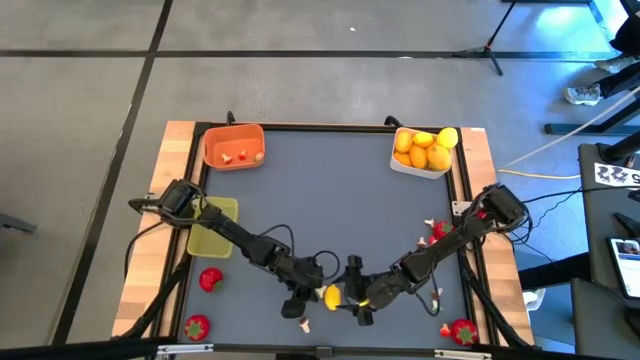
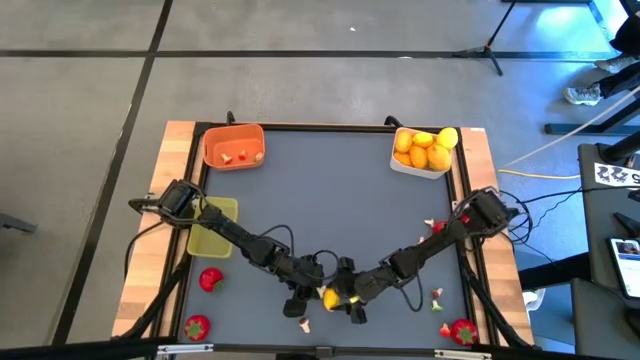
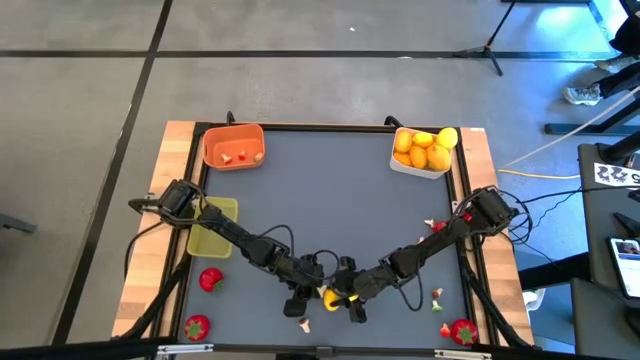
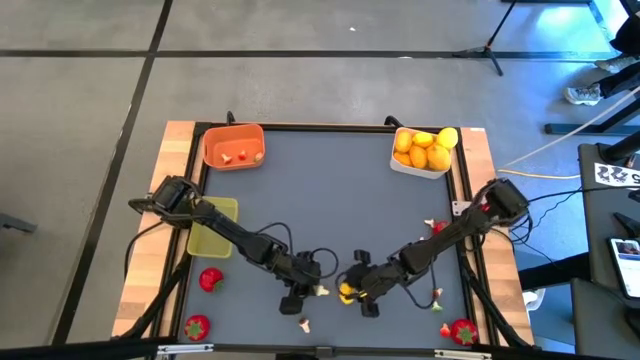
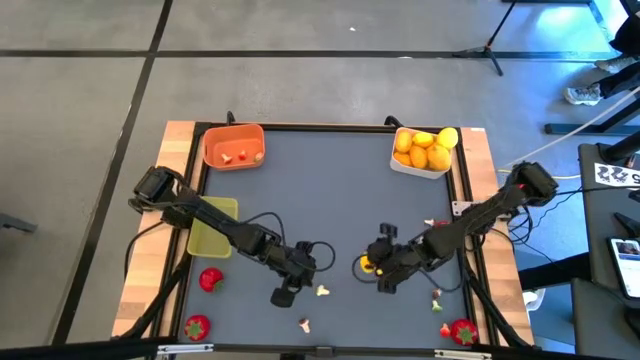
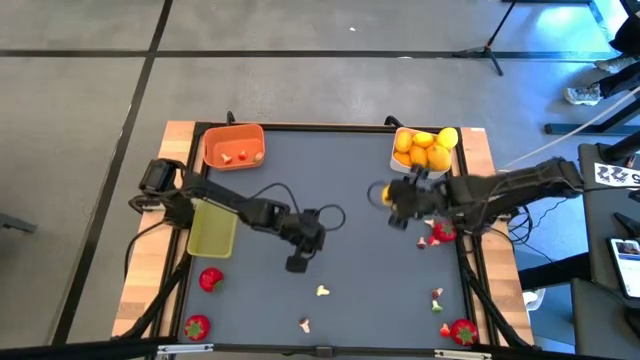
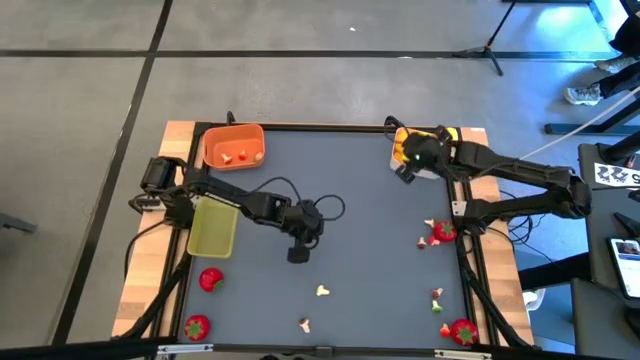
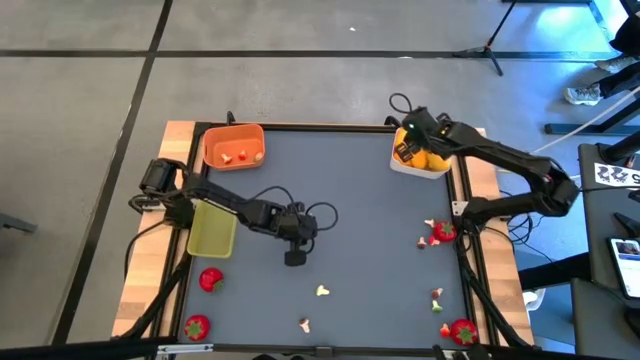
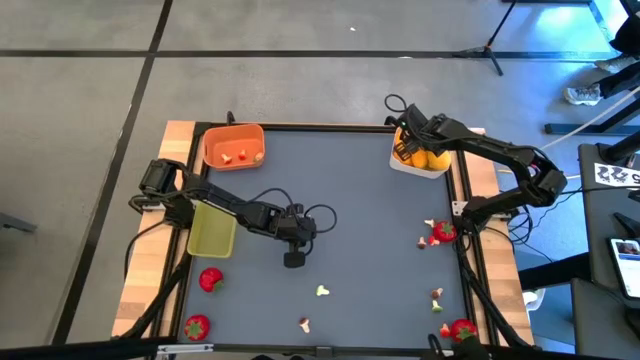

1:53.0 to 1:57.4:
Task: Sort produce into baskets
Put the lemon into the white bin

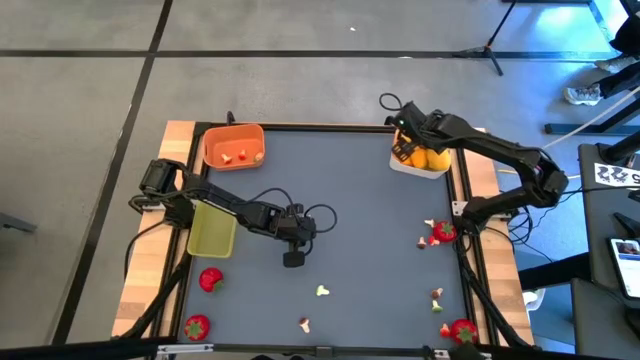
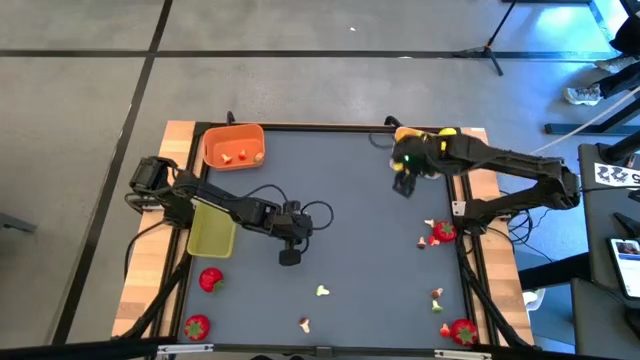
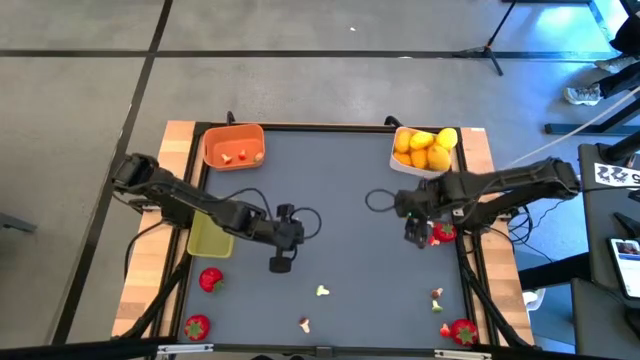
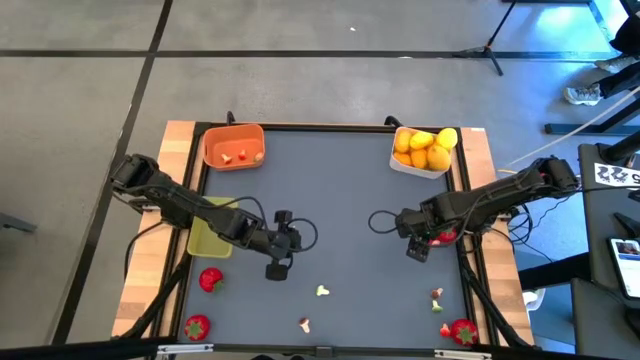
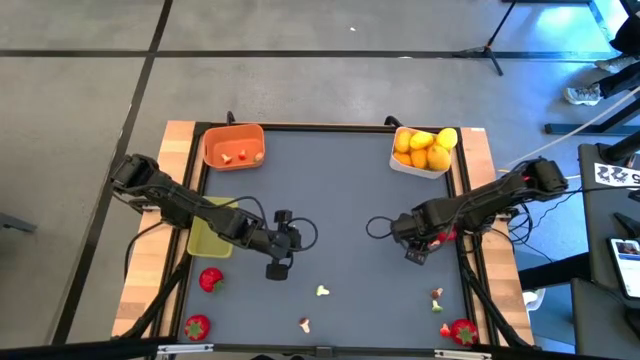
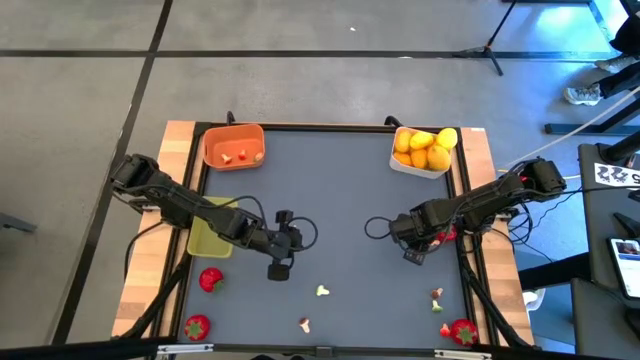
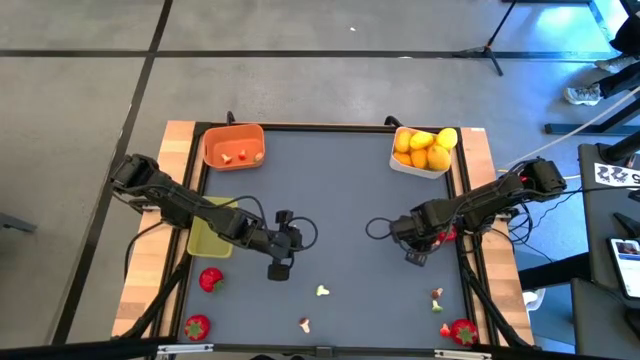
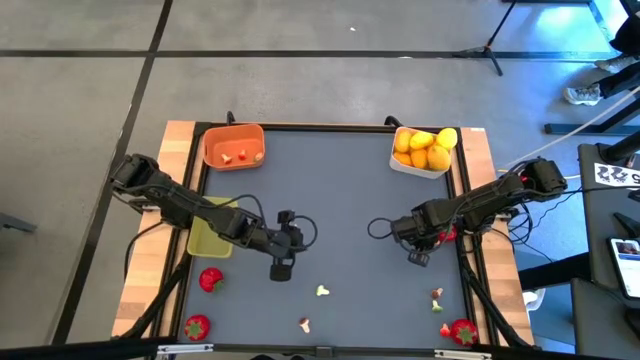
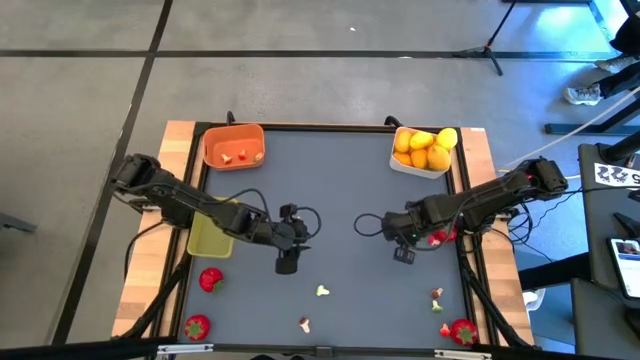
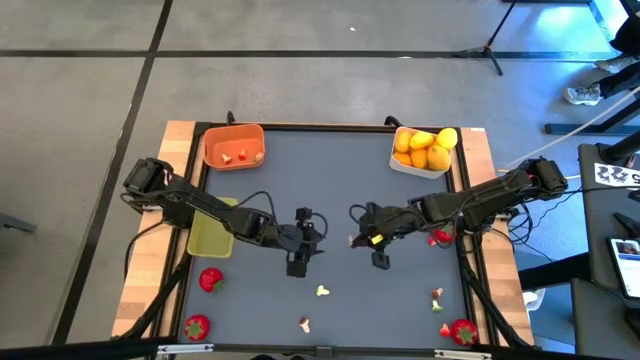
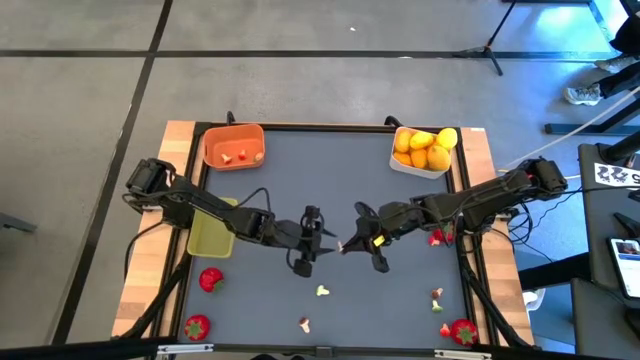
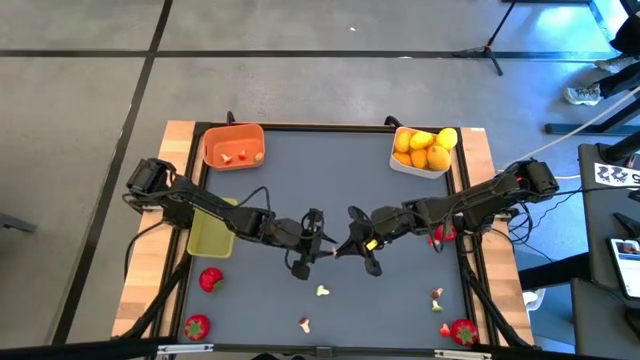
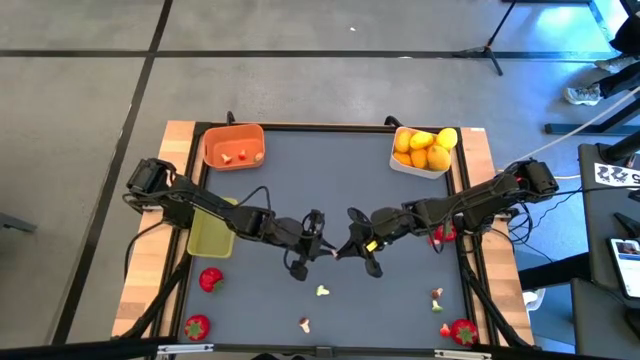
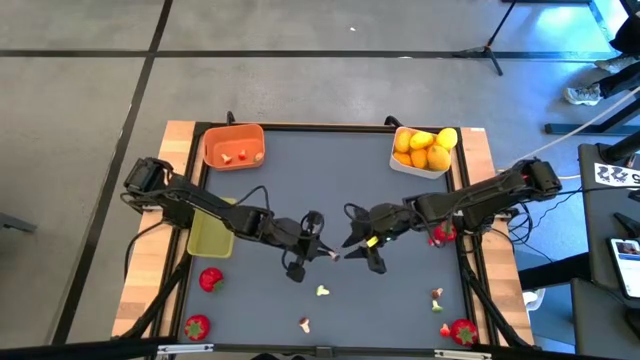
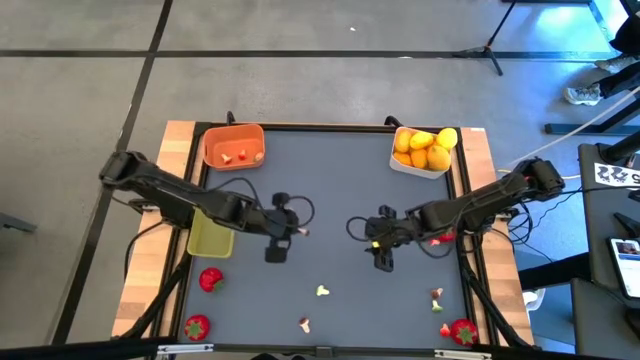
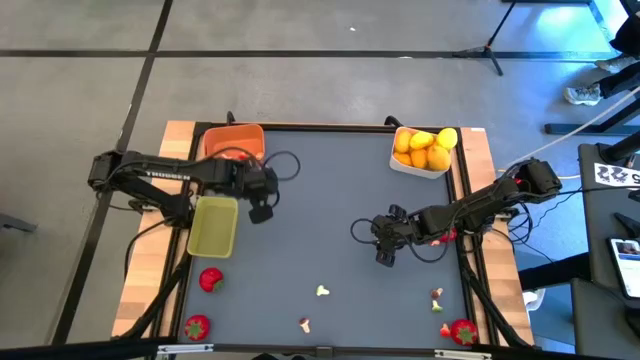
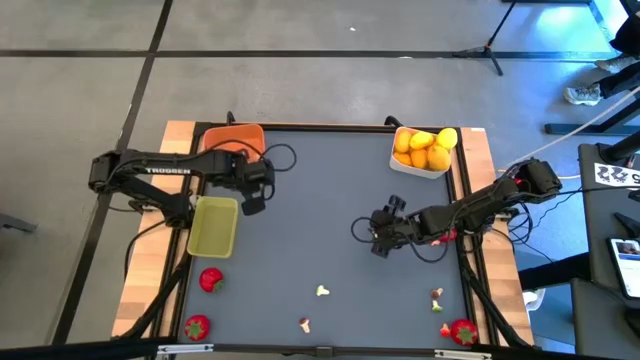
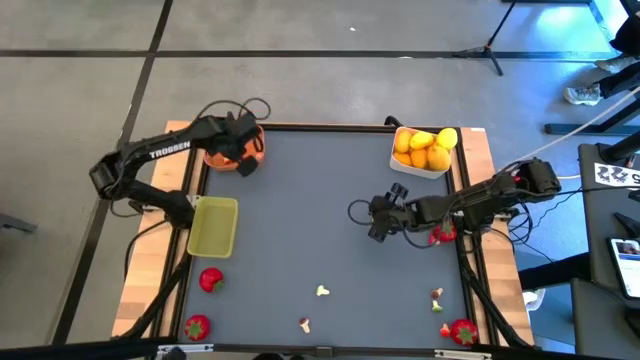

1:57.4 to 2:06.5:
Put the brown mushroom into the orange bin

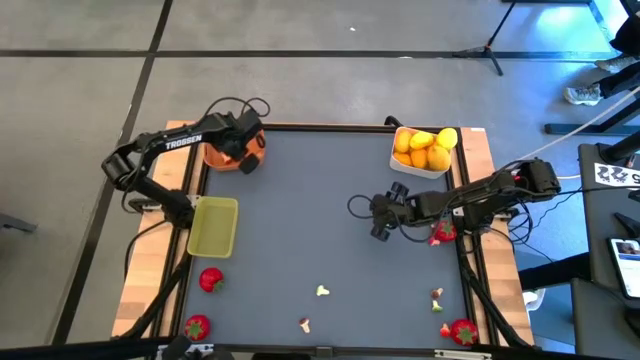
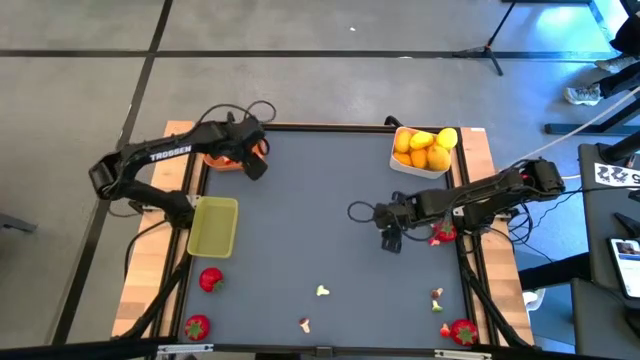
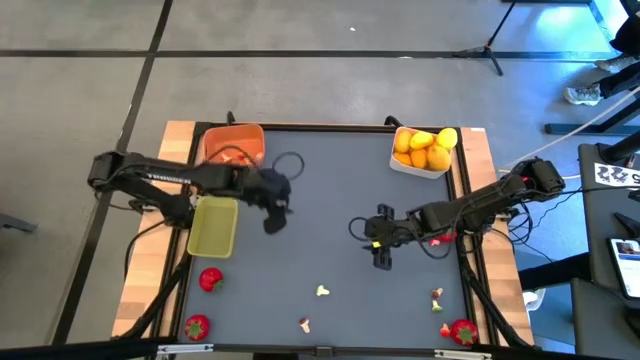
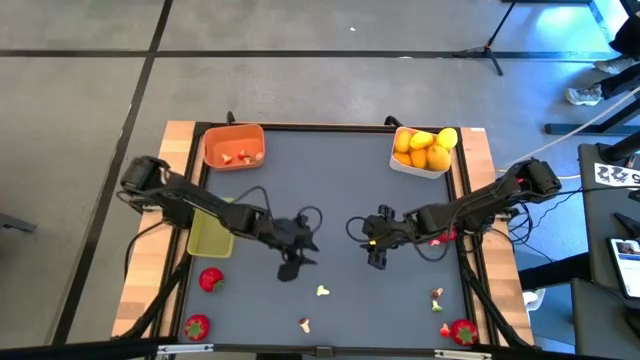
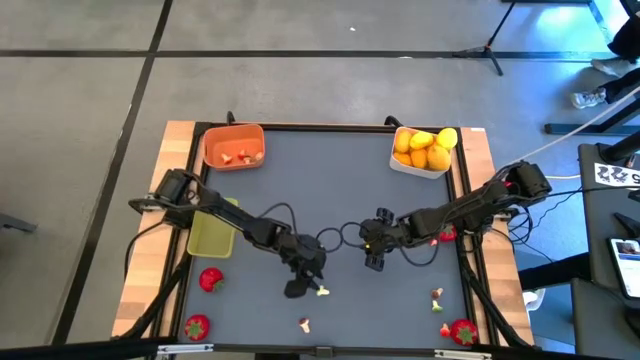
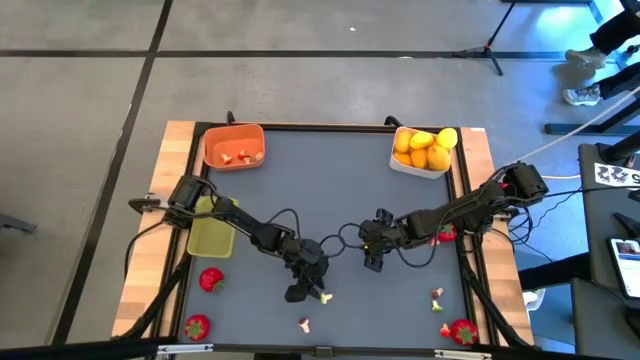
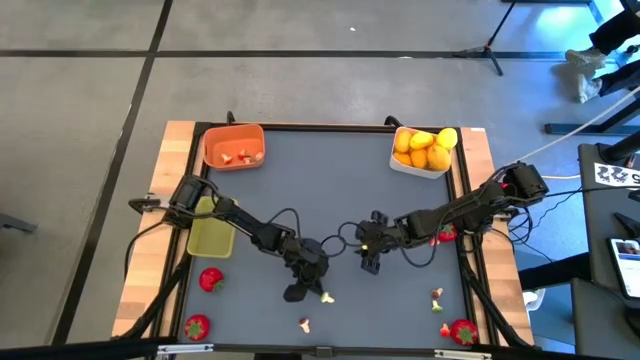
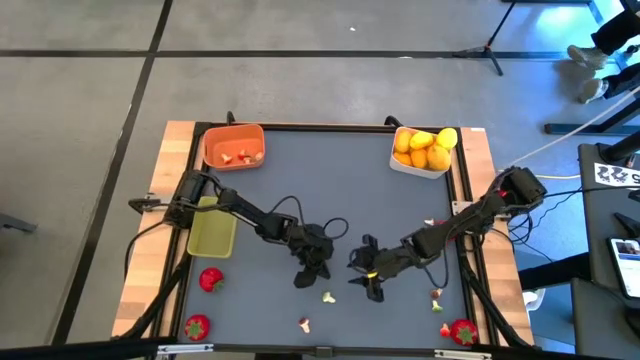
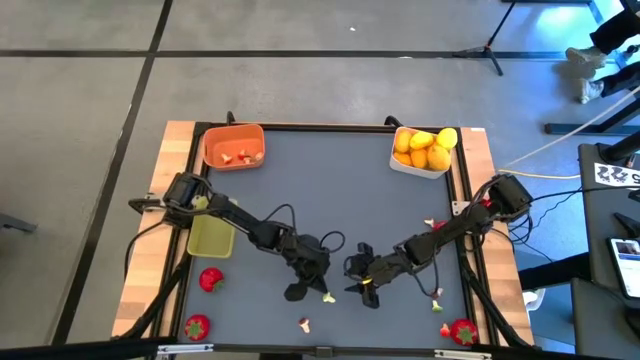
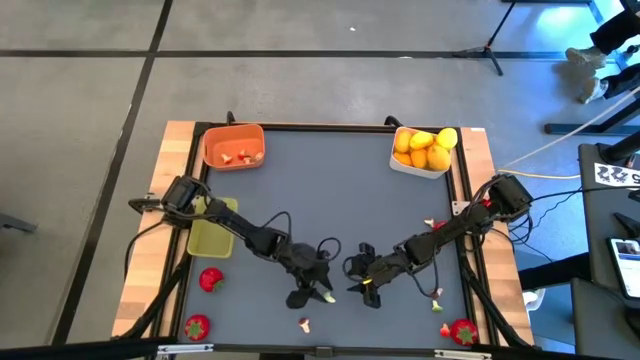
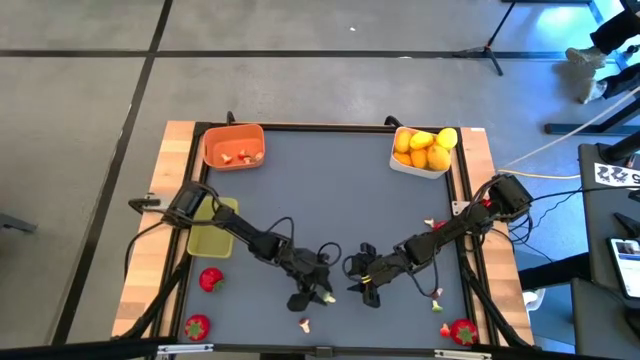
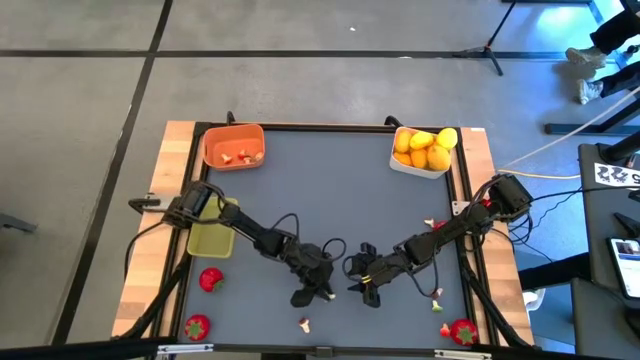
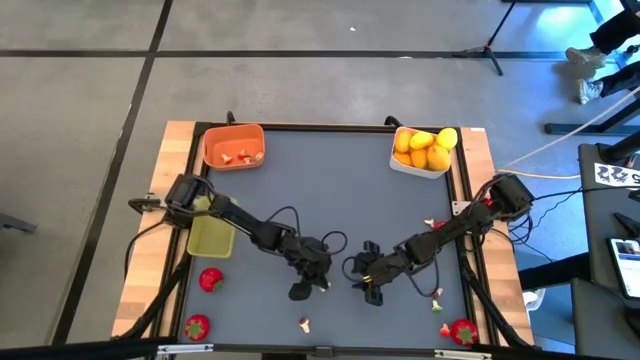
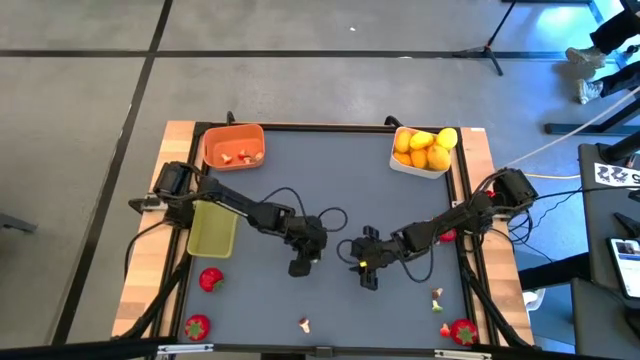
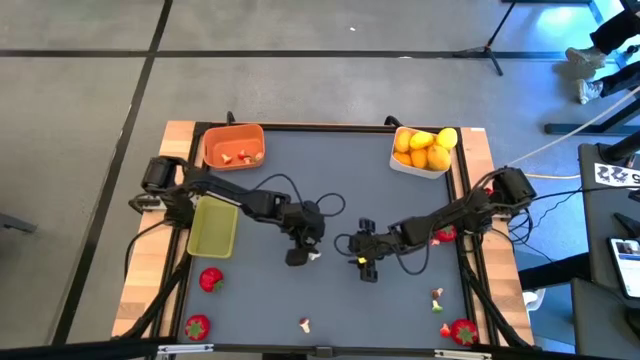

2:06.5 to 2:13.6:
Put the green mushroom into the orange bin

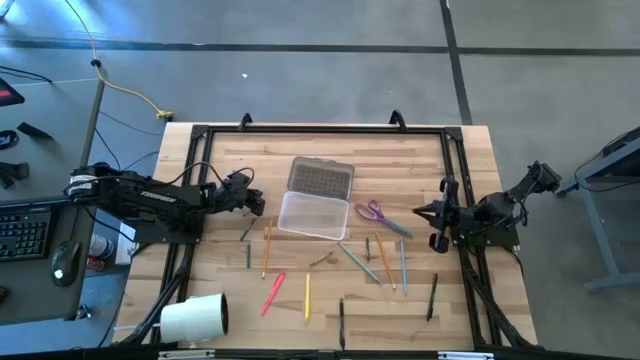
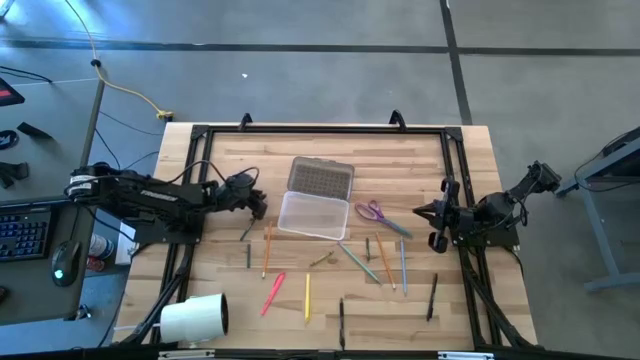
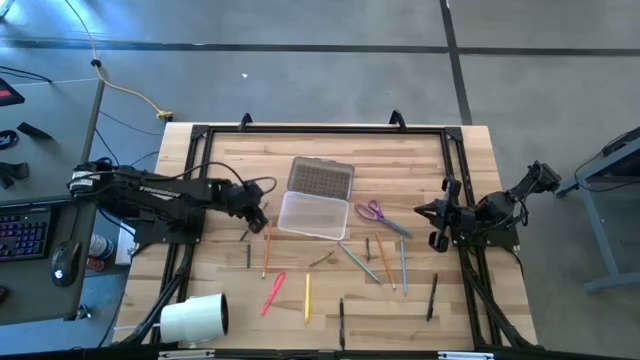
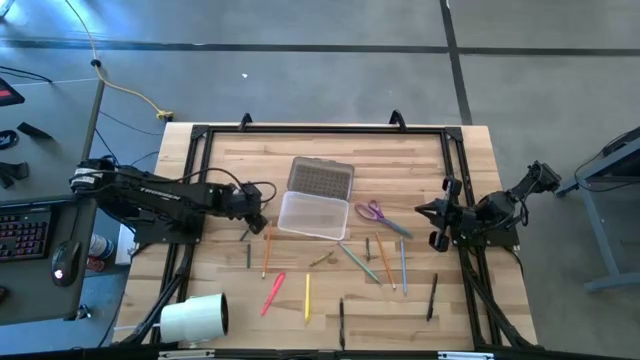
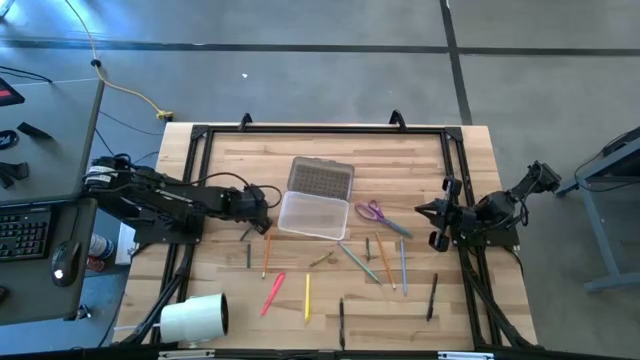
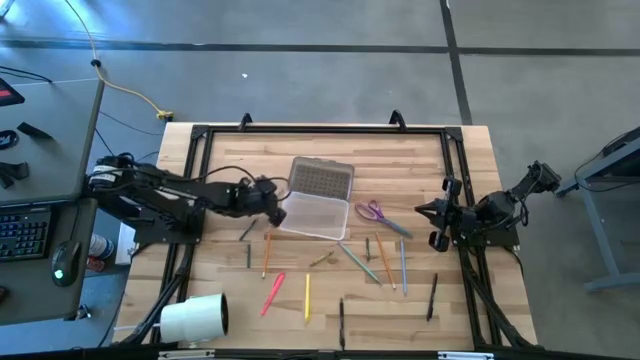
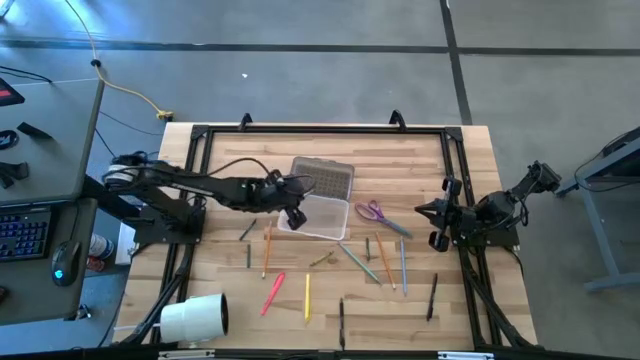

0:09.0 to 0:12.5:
Task: Pick & place school supplies into a supply box
Put the yellow crayon into the black supply box
